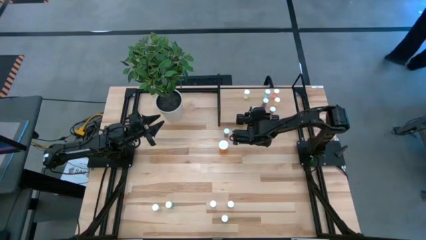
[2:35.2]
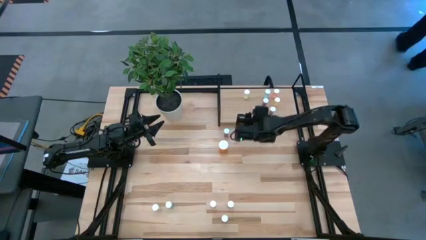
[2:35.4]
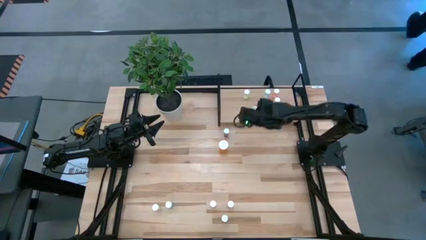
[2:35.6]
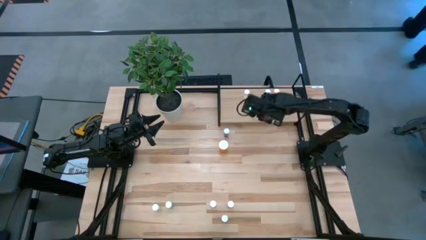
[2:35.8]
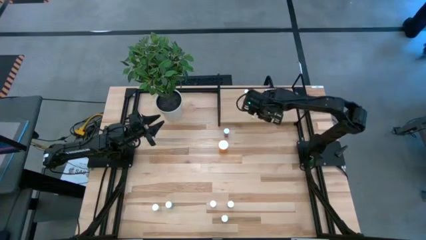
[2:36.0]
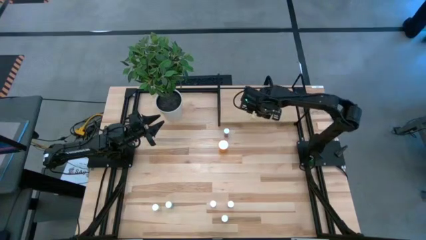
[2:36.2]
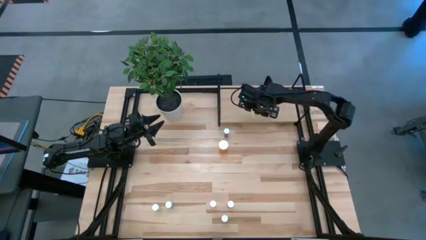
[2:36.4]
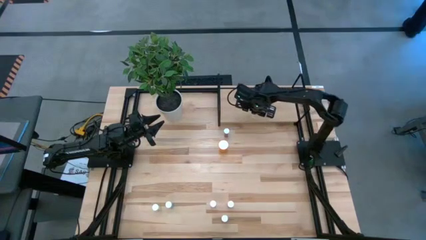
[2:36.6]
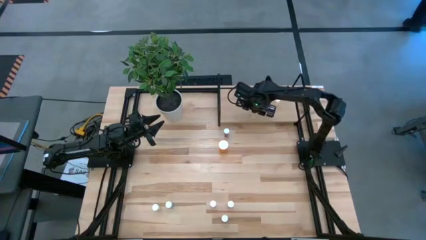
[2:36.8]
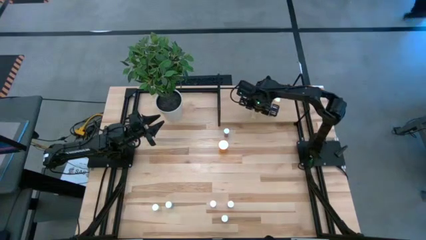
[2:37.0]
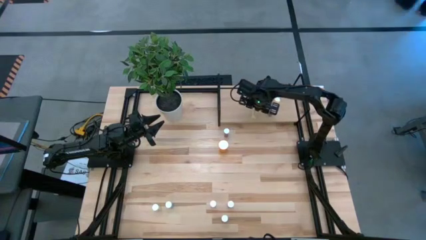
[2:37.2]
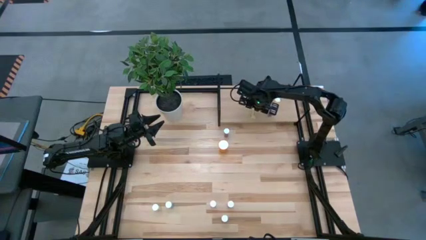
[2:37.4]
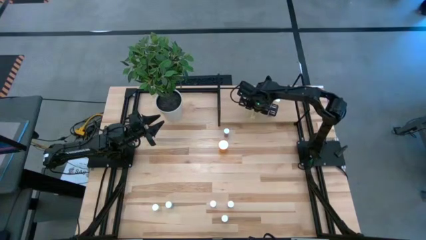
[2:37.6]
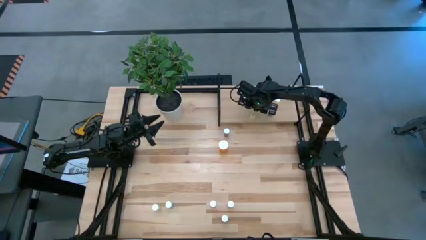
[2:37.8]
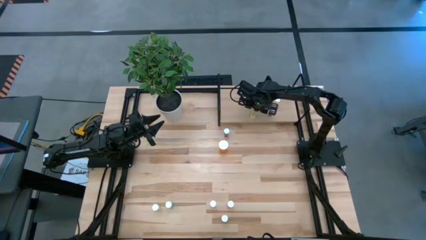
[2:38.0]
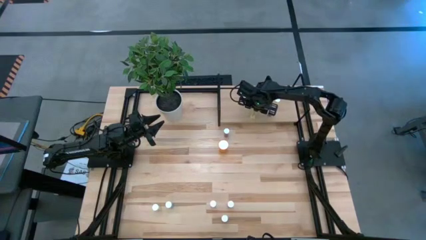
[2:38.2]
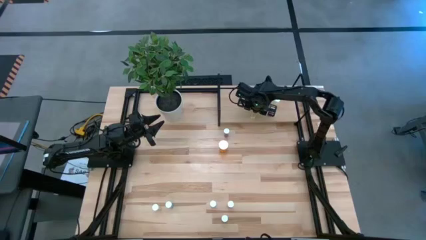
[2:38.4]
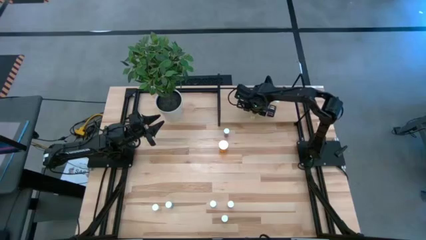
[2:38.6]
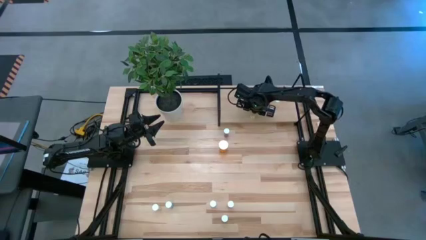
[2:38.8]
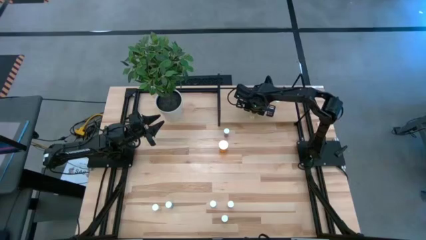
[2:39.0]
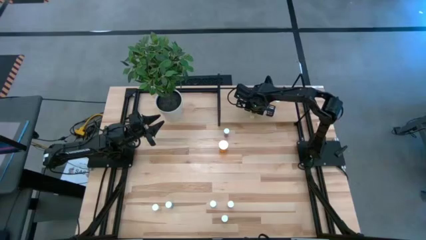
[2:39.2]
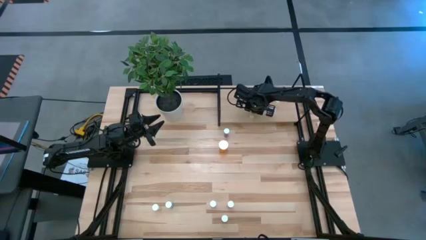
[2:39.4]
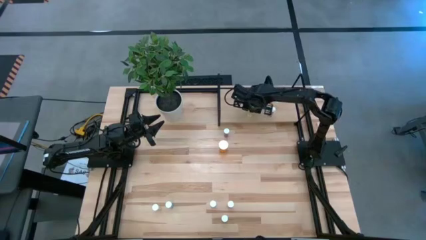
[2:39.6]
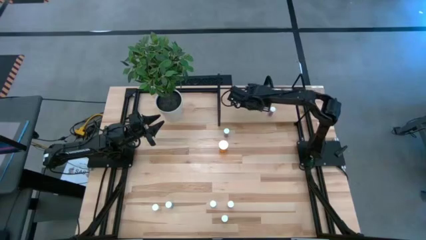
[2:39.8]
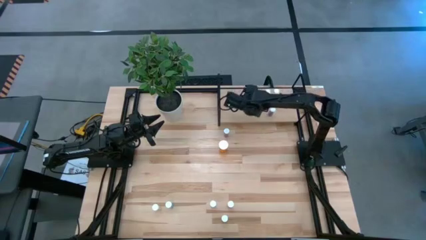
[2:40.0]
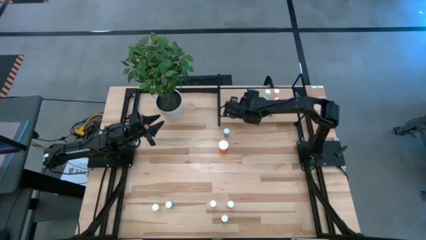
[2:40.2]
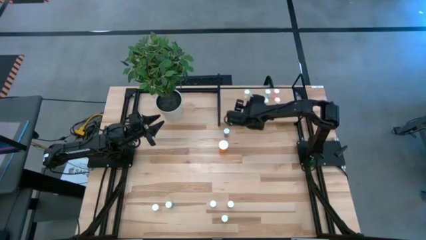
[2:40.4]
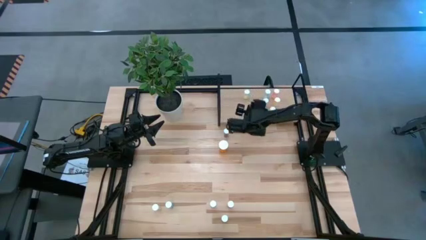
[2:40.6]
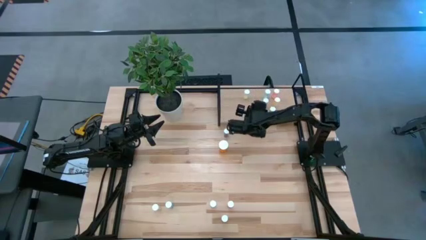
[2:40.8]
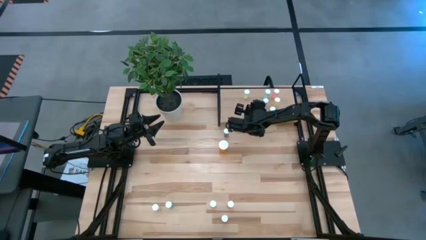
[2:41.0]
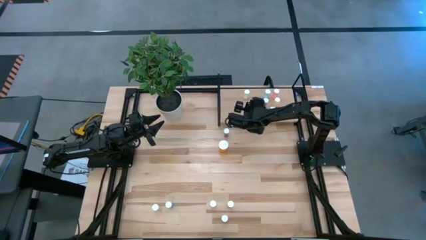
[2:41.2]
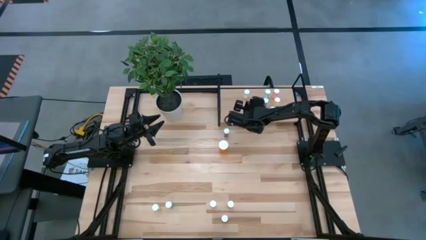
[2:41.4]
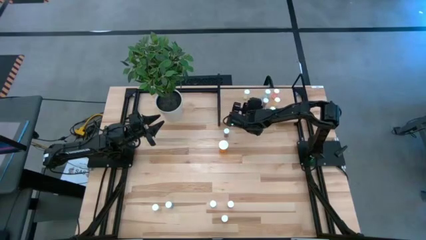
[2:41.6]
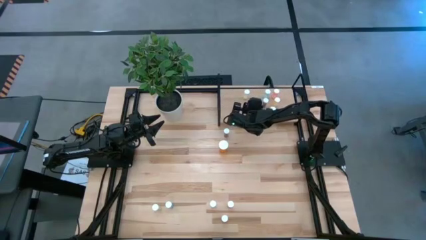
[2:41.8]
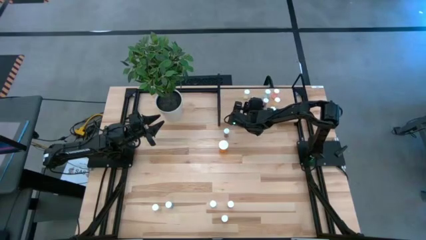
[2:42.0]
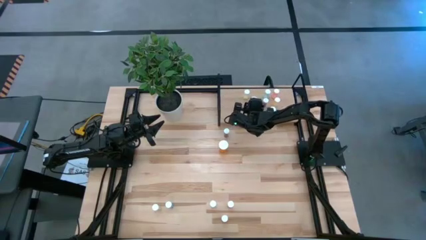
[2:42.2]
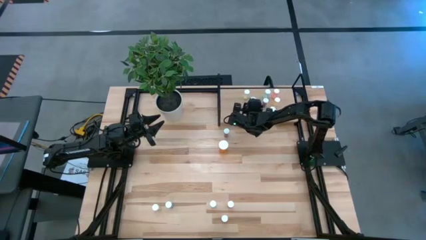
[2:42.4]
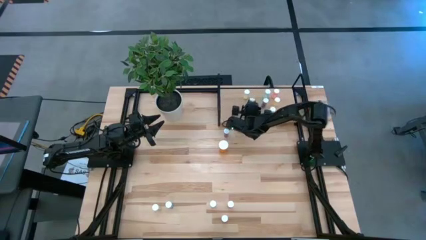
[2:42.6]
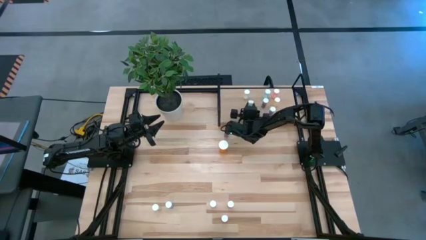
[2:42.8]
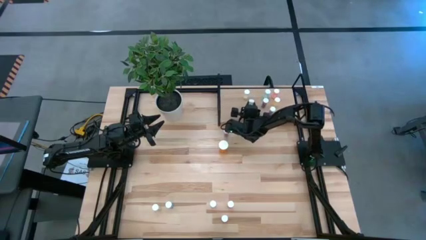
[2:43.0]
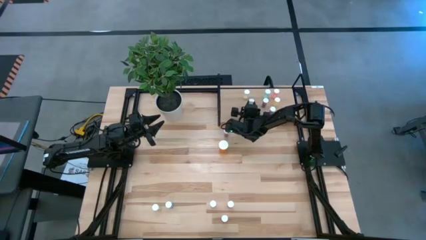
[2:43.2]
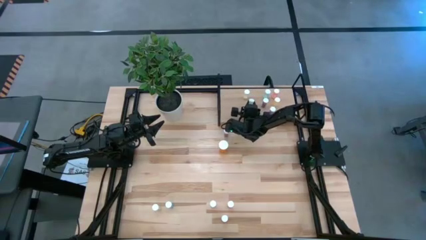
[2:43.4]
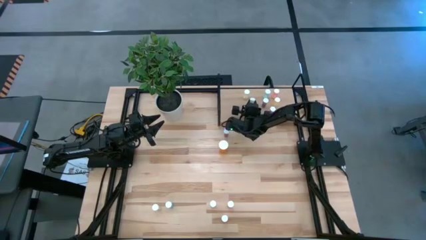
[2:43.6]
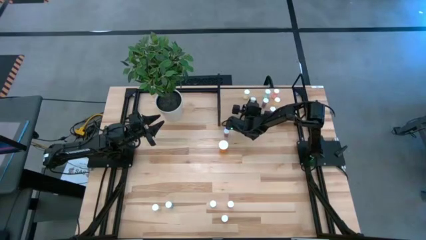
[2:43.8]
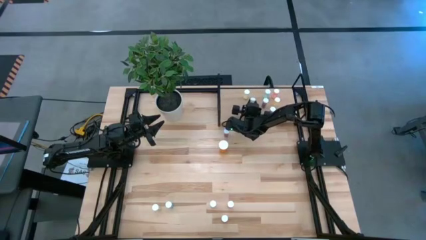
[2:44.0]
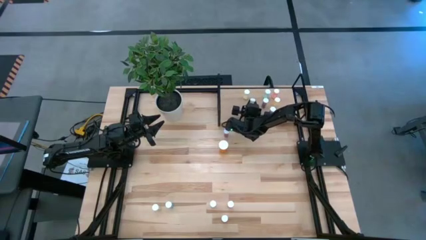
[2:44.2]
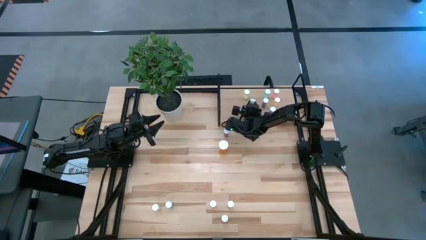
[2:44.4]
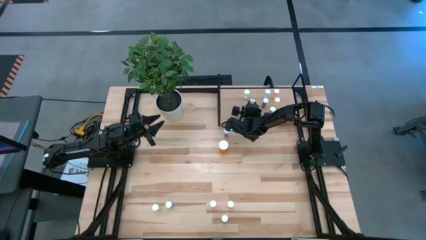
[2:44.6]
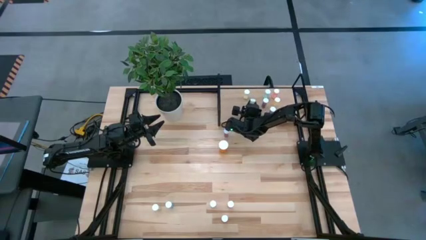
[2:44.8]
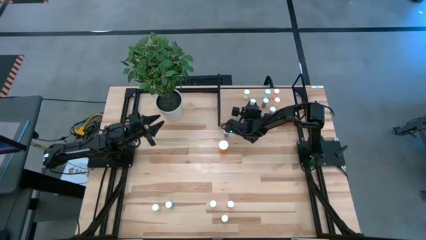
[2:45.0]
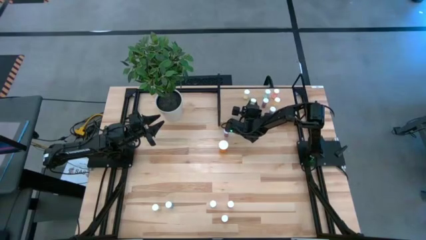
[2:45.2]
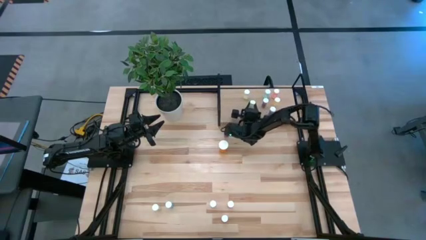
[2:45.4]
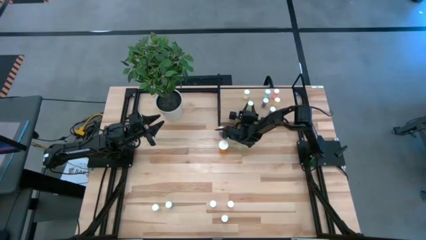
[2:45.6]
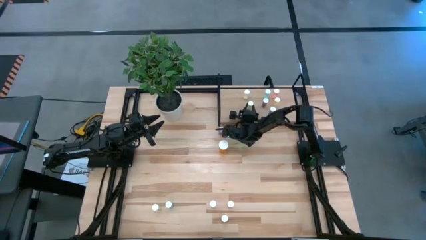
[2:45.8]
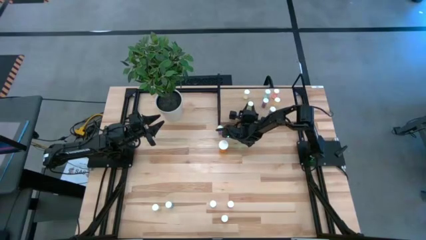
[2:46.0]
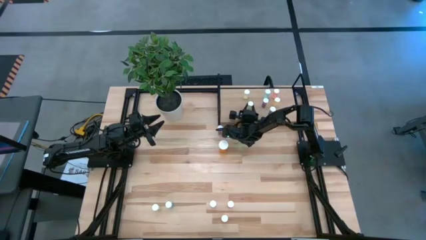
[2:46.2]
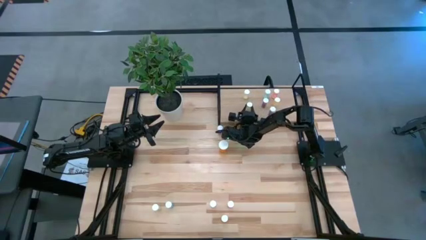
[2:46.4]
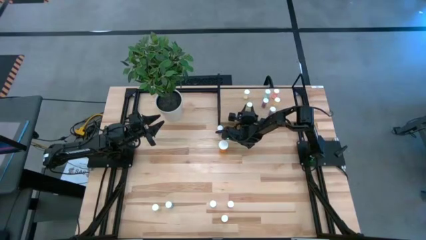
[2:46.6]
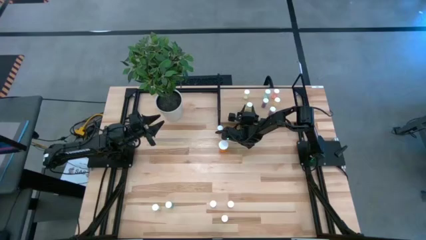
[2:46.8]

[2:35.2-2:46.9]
Task: Pick and place medicine bottles onto shelf by color
Put the right yellow pill bottle on the shelf

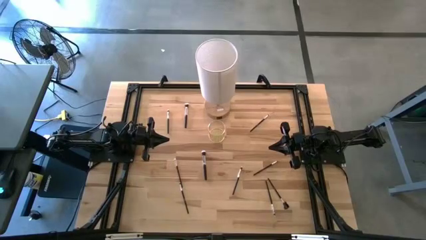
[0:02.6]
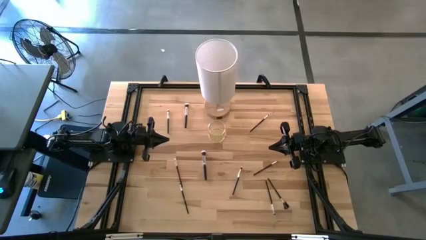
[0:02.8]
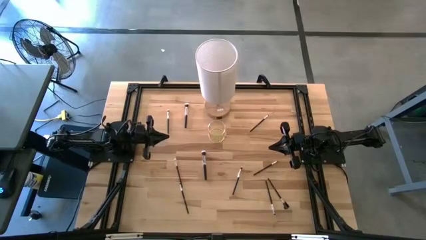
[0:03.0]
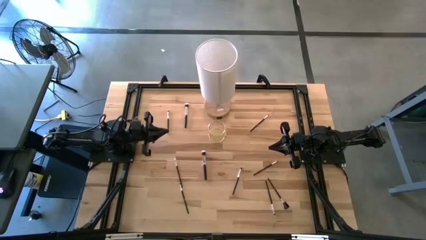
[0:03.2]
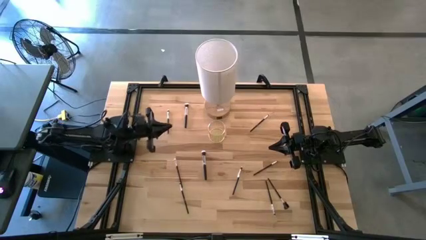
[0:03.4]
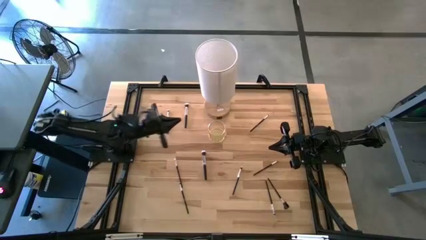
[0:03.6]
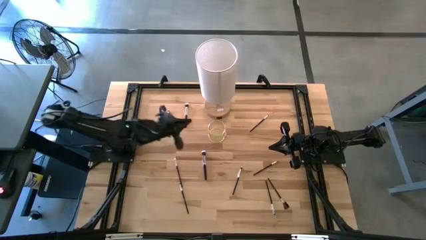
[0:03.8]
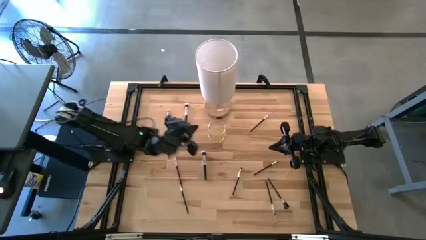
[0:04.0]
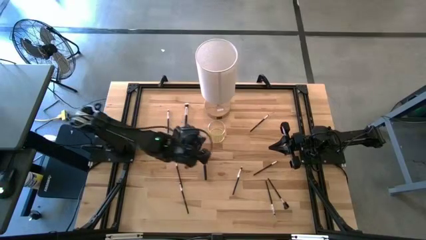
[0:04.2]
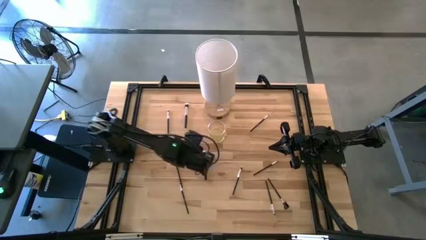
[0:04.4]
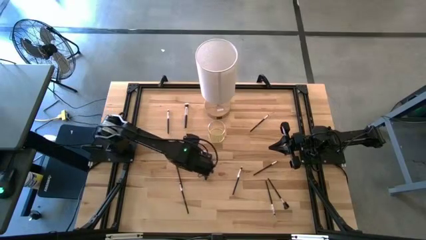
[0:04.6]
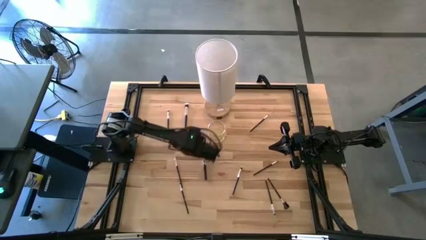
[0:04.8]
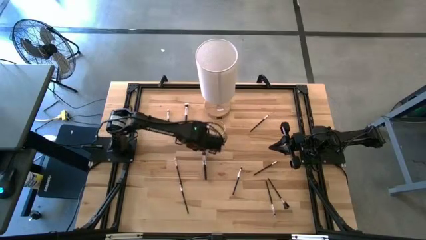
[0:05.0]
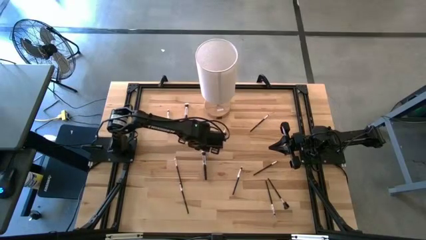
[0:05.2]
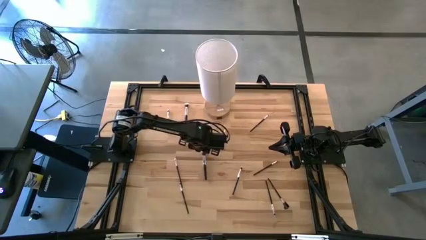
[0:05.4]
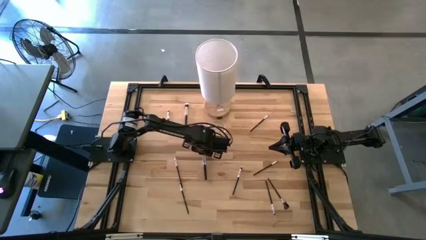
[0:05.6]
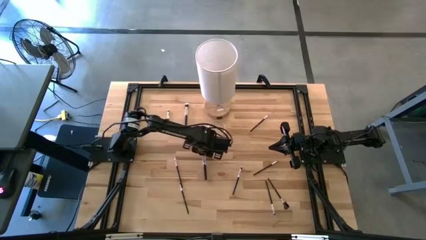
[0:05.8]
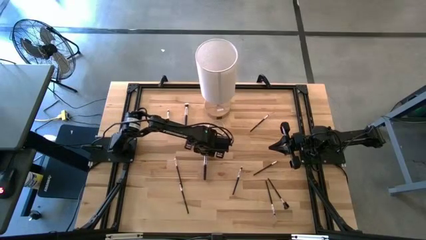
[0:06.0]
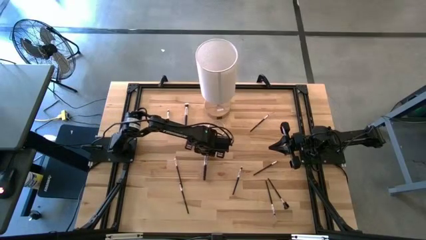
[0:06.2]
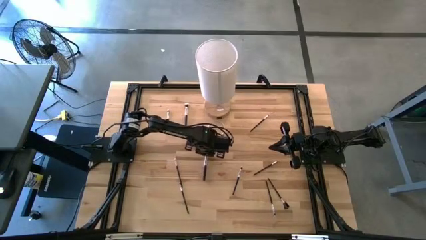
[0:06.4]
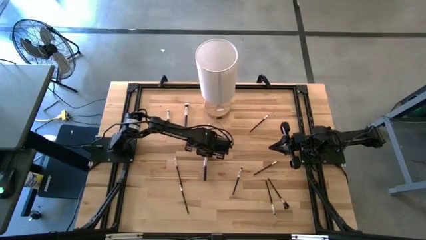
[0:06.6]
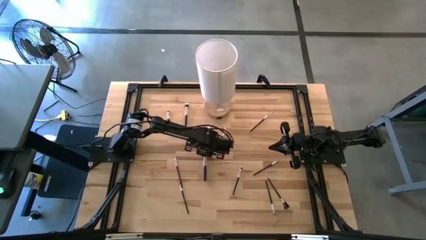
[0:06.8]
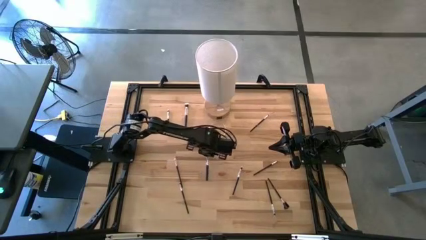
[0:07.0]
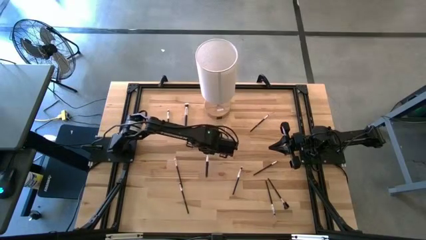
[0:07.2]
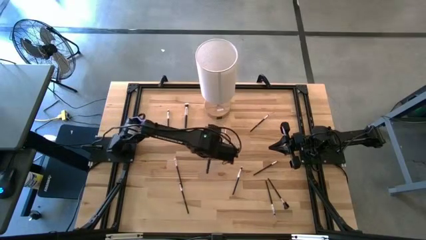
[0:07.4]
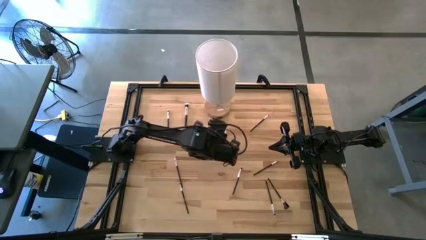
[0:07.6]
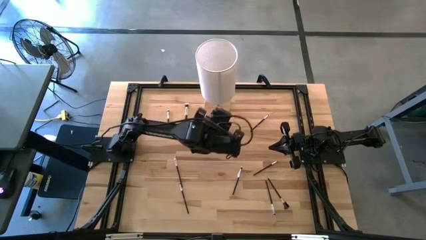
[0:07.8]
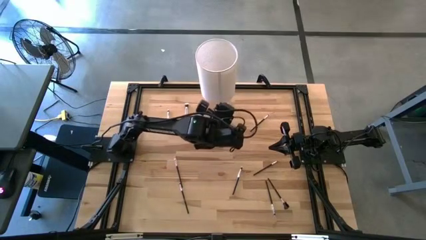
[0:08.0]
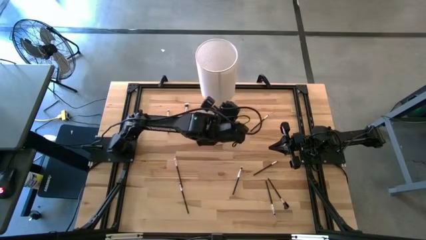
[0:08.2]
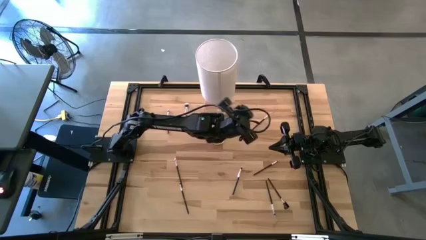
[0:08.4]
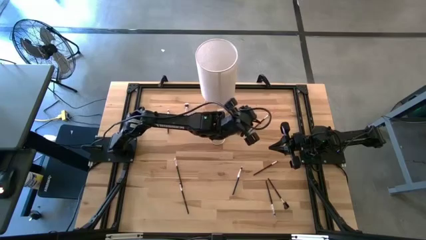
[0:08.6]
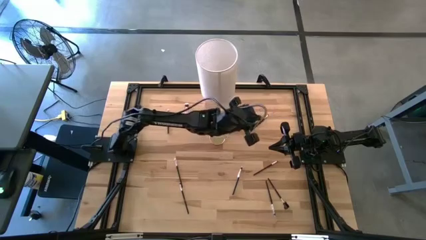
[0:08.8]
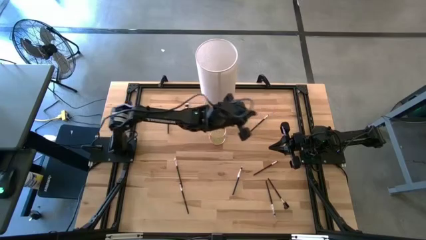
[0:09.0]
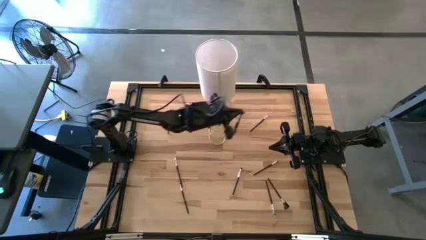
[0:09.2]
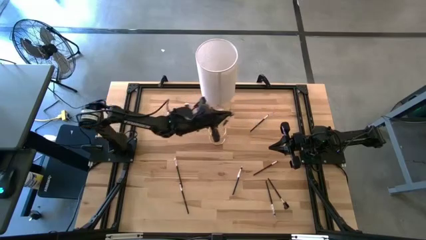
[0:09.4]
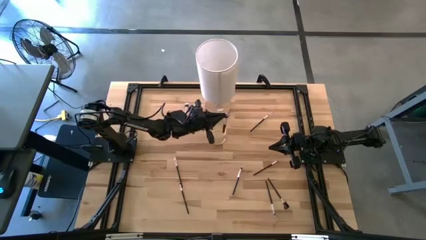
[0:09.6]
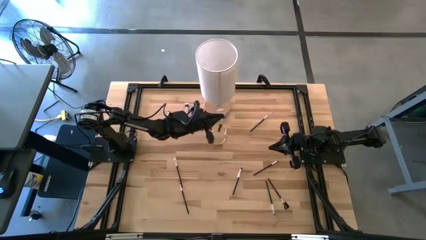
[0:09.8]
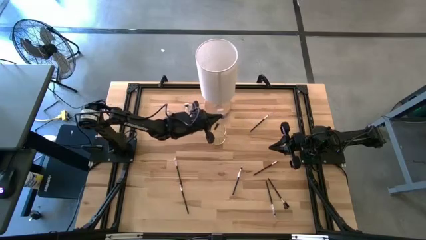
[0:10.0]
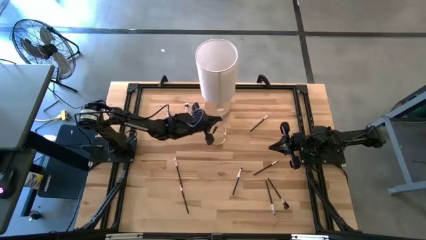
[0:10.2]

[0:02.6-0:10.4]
Task: Put items in baskets/containers
Put the black powder brush into the gold container
